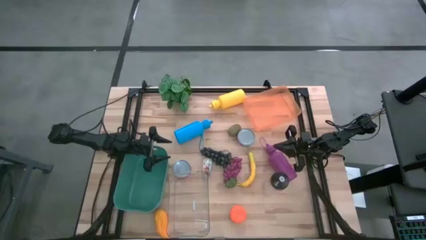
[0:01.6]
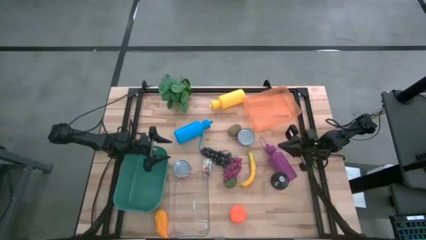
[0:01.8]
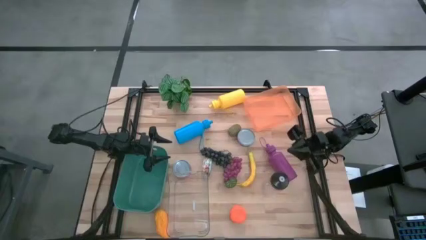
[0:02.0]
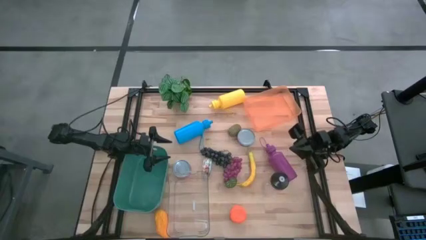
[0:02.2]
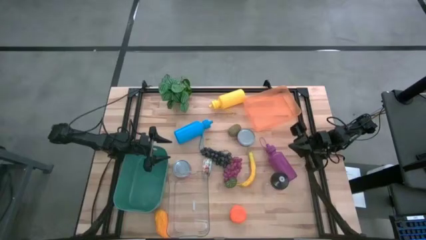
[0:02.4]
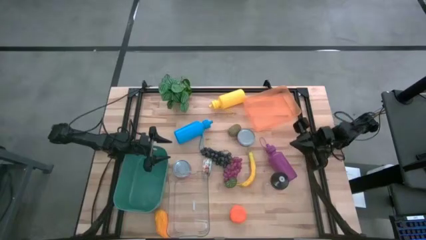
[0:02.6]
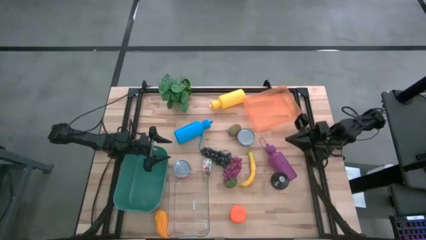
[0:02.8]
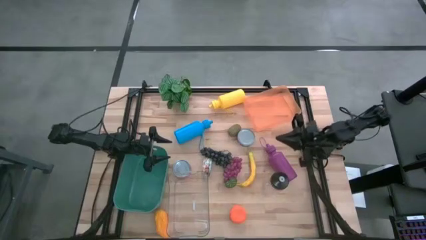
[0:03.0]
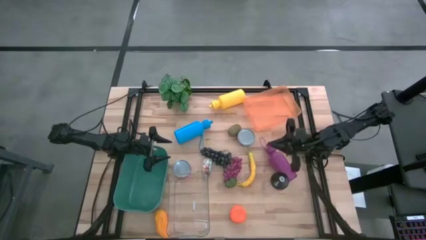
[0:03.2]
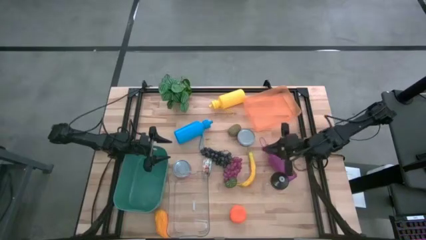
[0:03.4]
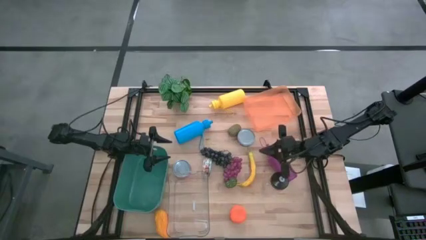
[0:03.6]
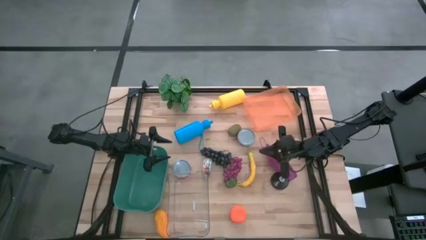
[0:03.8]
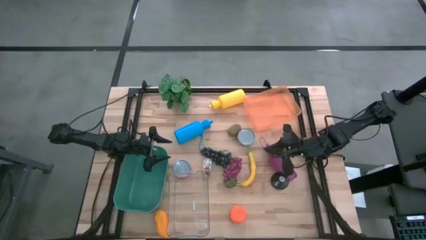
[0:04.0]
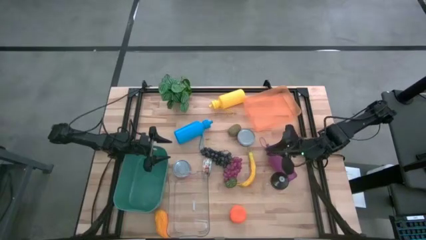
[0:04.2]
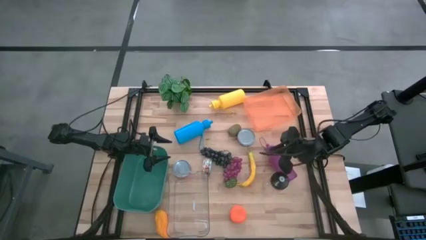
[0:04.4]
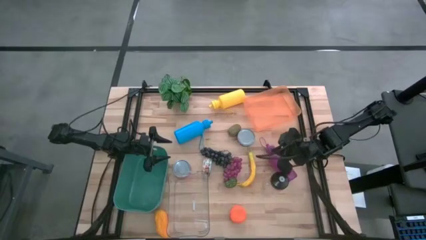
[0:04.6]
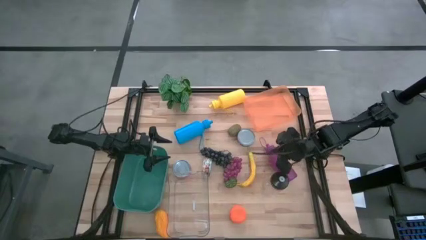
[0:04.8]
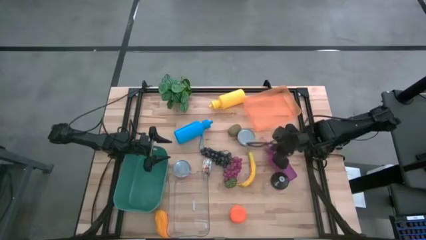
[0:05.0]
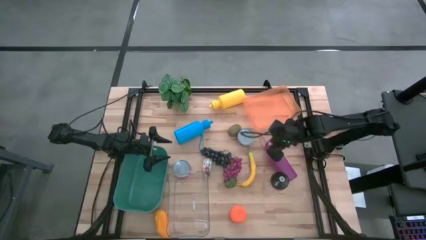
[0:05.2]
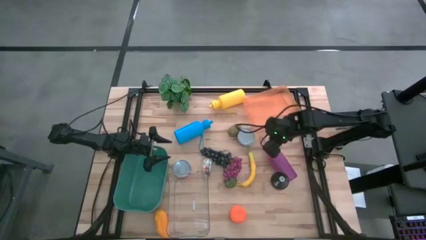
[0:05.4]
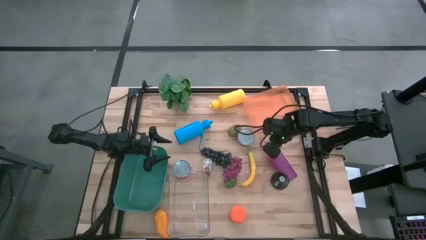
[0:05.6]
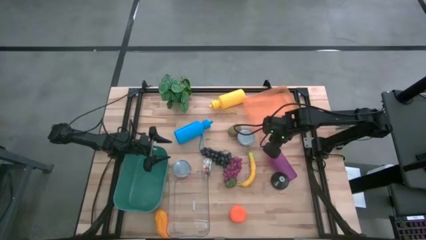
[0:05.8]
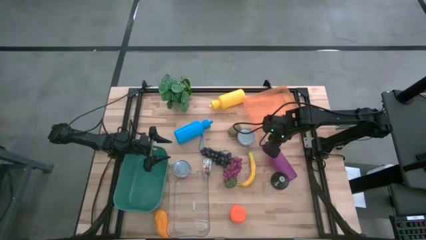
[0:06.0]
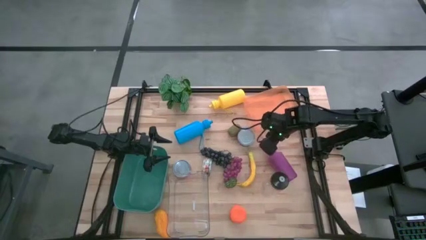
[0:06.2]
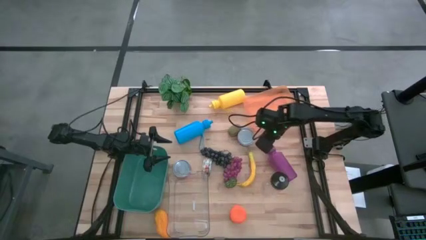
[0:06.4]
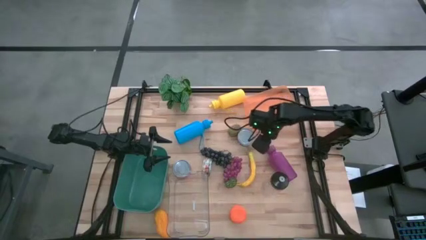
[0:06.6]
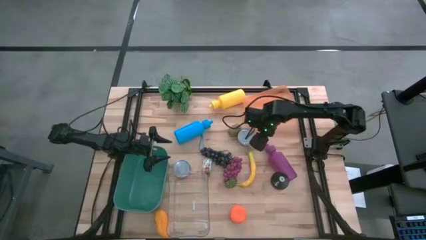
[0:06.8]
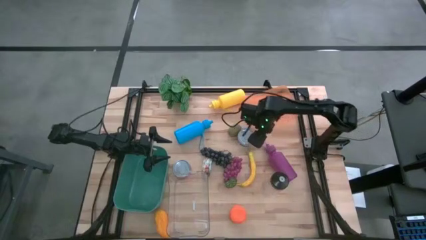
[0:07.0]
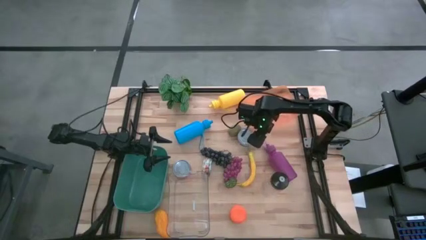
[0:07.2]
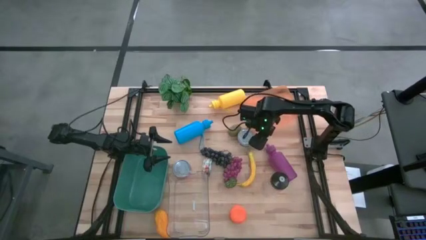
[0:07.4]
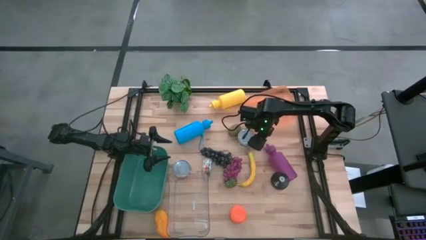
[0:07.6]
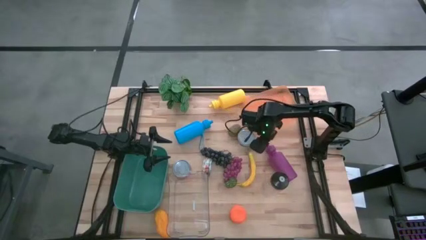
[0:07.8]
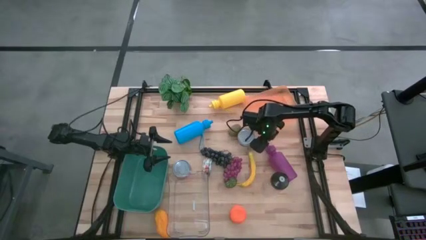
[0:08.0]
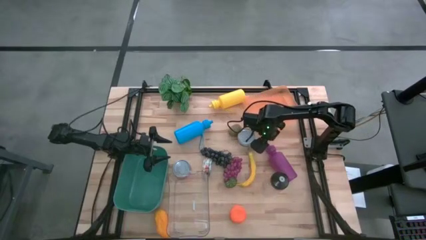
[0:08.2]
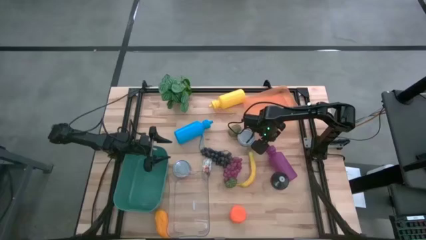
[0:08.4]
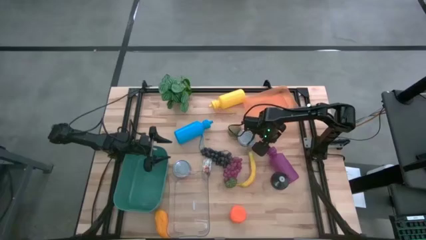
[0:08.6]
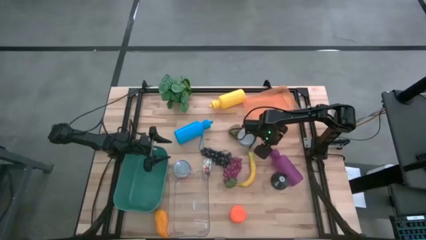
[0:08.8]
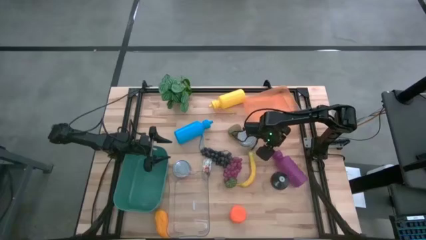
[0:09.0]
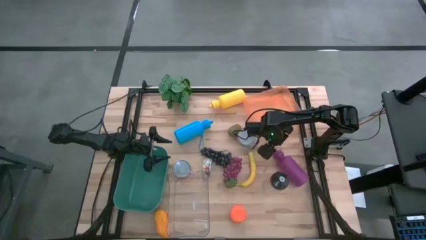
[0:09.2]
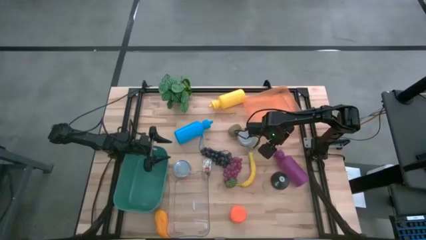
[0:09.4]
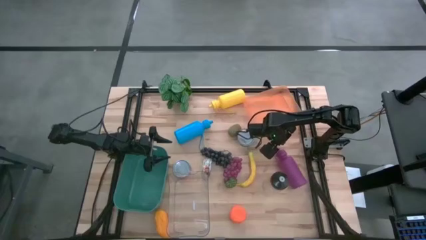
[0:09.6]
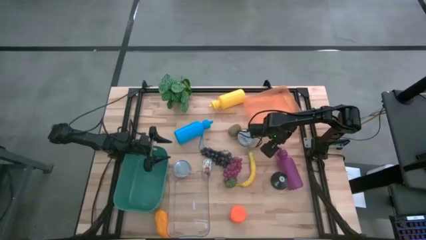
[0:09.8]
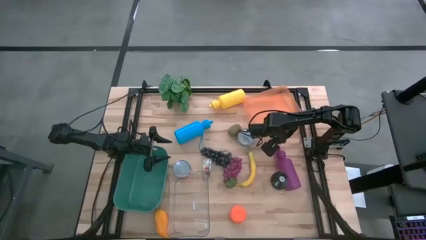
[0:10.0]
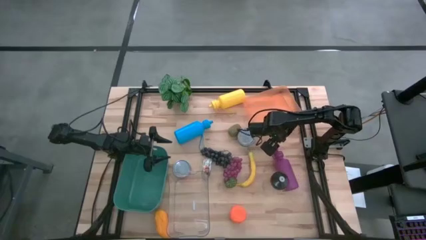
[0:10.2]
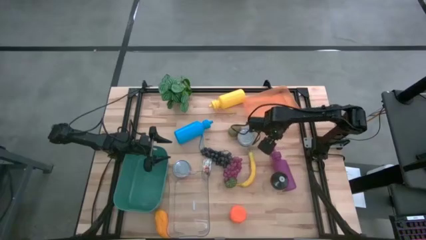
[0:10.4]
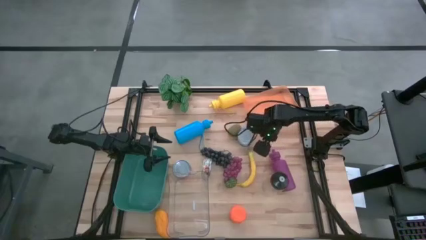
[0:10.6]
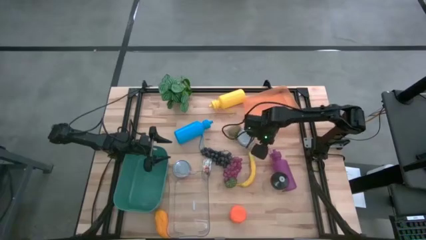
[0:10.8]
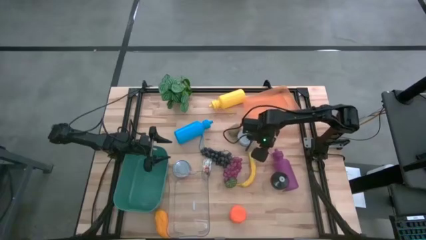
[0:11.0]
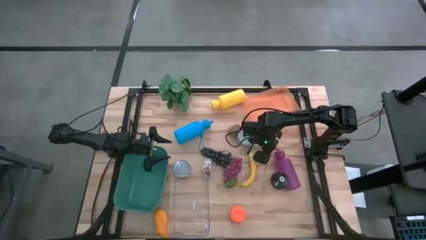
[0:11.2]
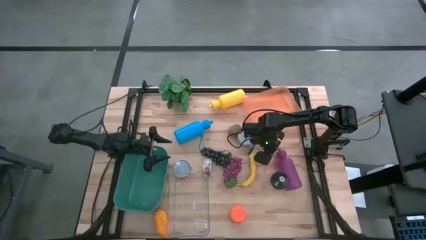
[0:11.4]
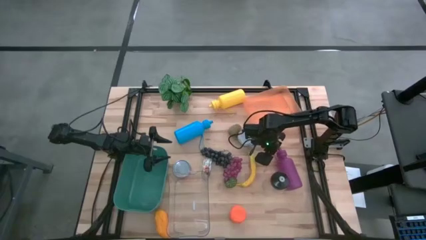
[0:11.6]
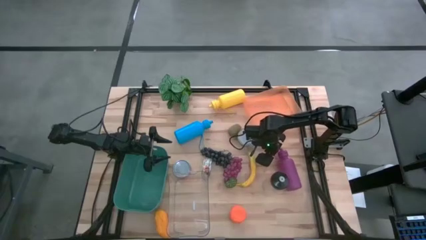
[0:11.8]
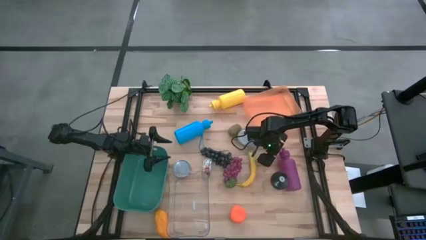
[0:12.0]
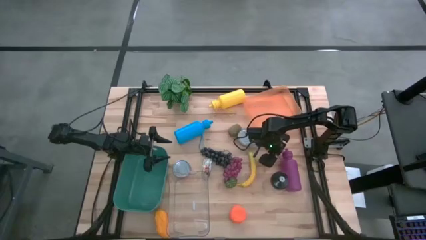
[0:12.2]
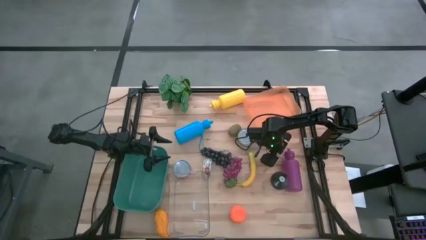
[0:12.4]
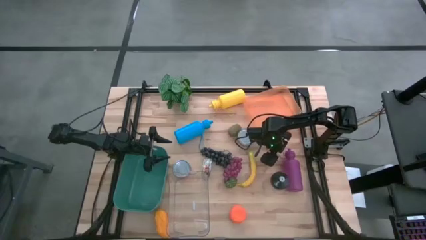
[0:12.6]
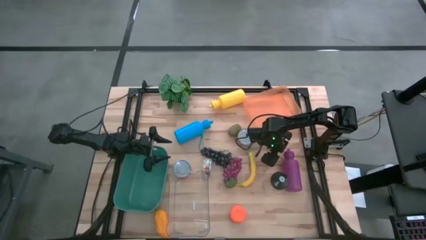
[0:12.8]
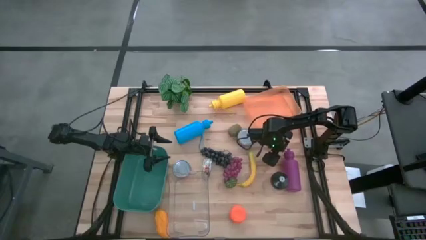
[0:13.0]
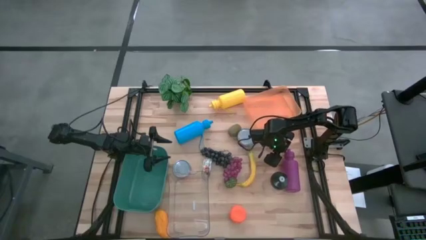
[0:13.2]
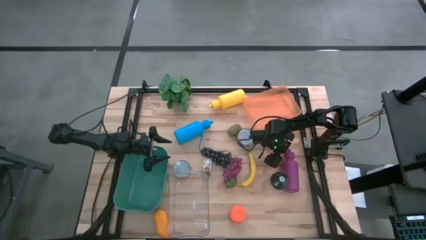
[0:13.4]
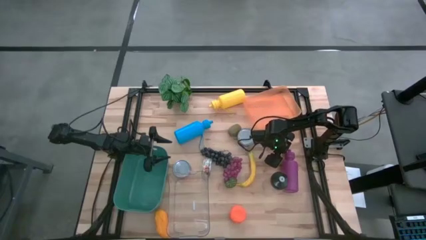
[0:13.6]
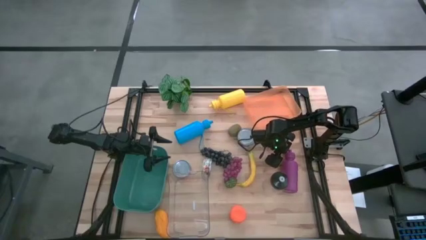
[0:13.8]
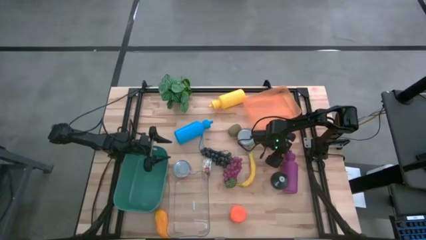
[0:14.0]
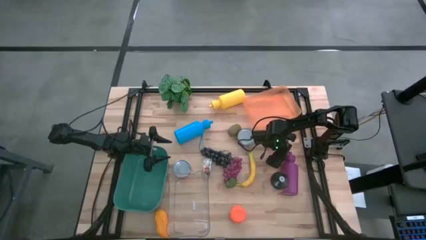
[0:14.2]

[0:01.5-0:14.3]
Task: Pick & Place Food Item
Put the purple tumbler into the orange bin
